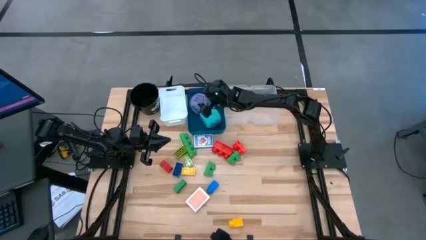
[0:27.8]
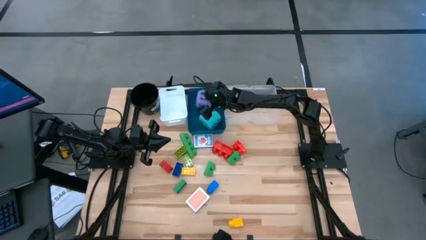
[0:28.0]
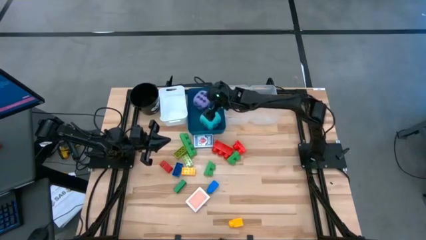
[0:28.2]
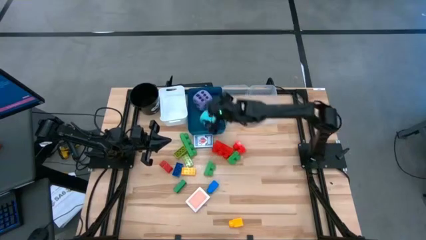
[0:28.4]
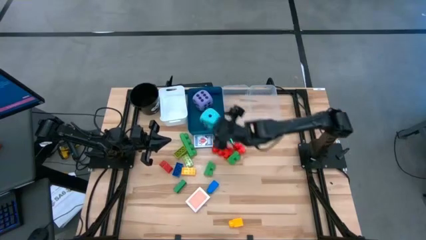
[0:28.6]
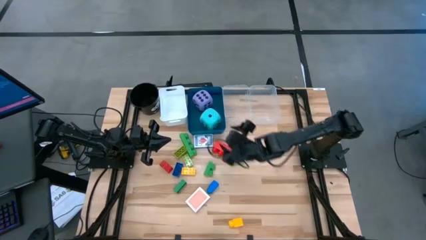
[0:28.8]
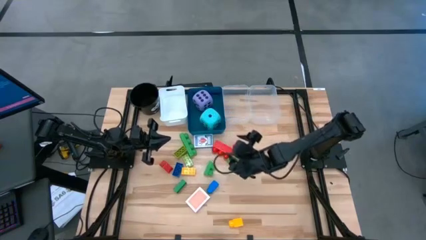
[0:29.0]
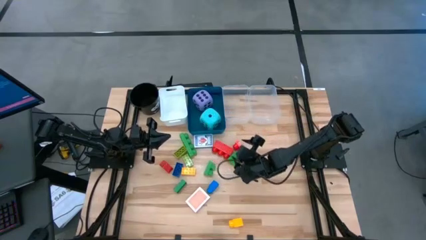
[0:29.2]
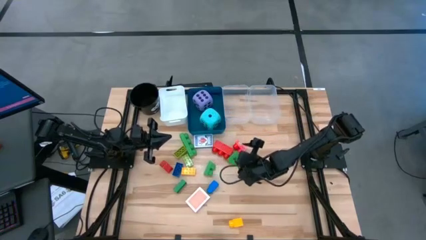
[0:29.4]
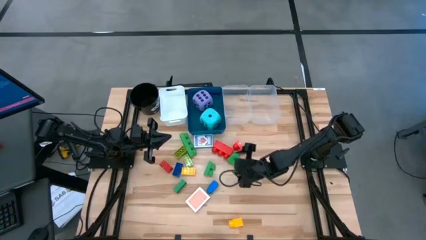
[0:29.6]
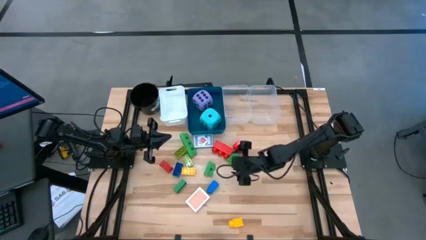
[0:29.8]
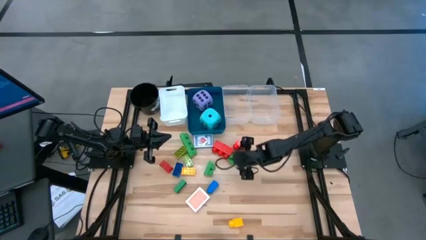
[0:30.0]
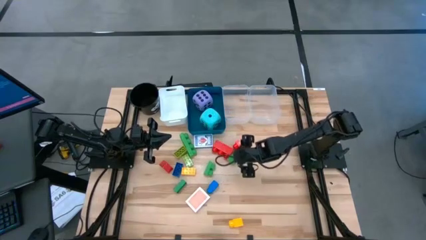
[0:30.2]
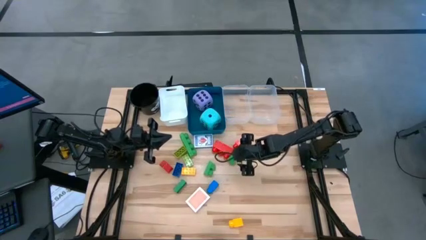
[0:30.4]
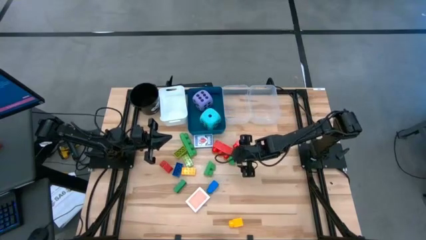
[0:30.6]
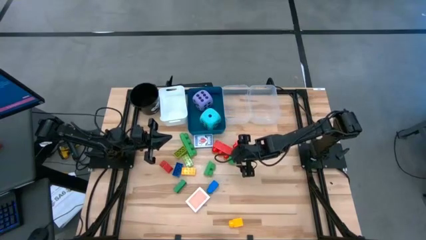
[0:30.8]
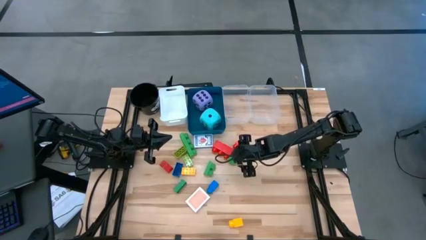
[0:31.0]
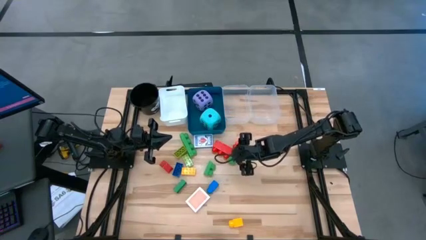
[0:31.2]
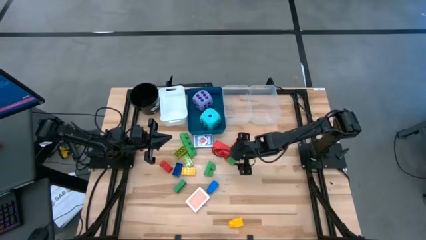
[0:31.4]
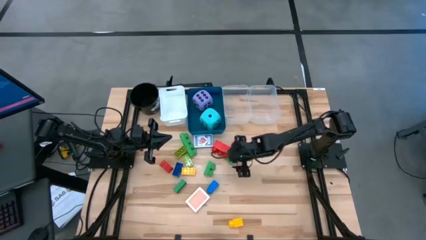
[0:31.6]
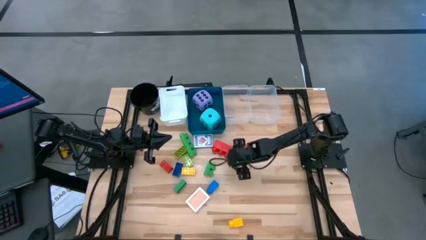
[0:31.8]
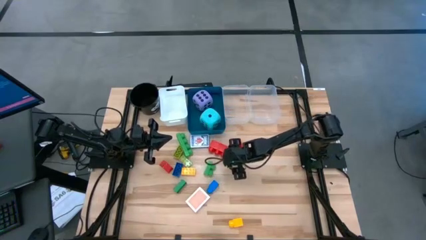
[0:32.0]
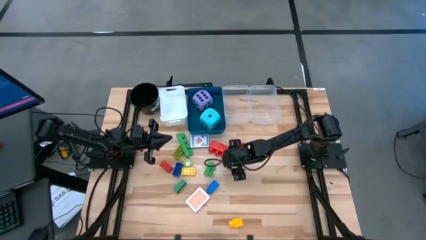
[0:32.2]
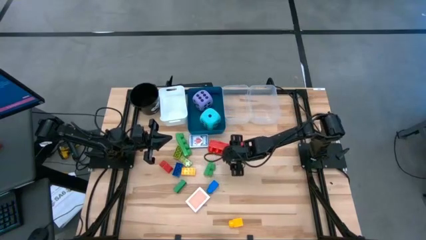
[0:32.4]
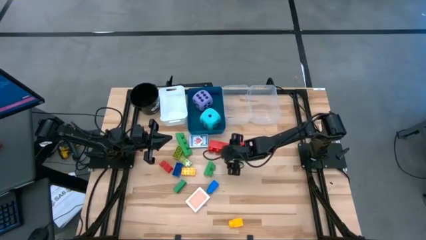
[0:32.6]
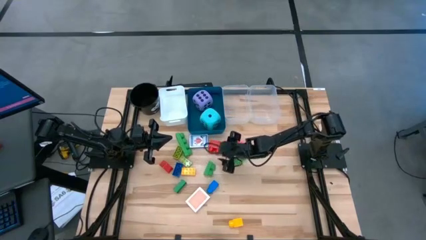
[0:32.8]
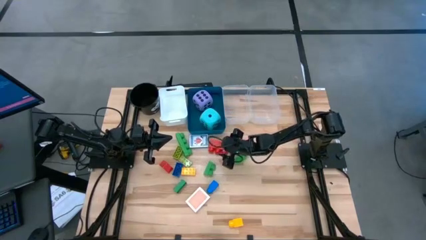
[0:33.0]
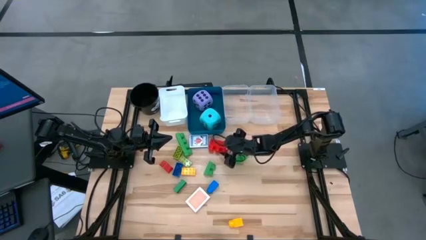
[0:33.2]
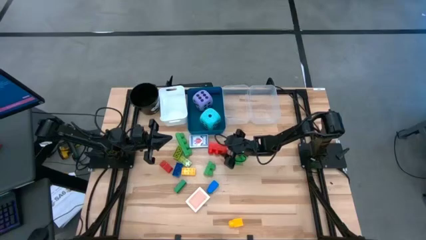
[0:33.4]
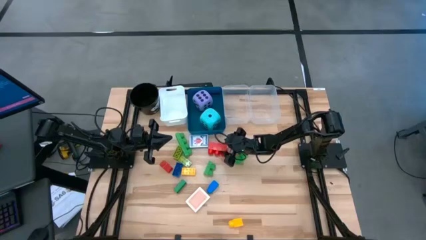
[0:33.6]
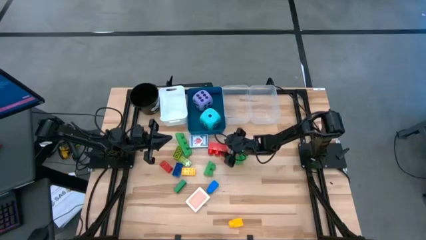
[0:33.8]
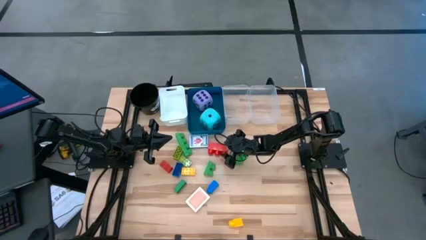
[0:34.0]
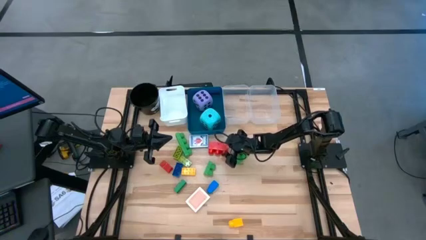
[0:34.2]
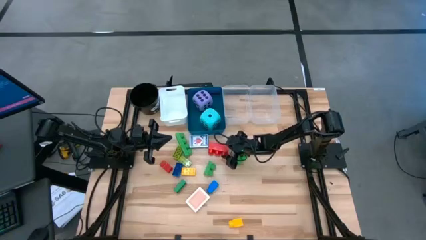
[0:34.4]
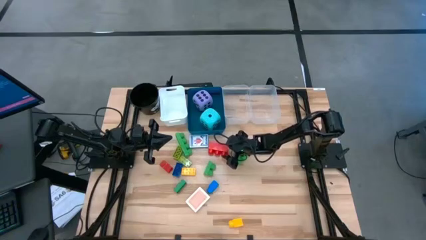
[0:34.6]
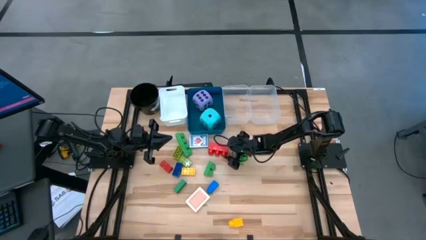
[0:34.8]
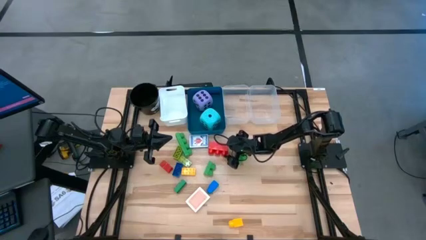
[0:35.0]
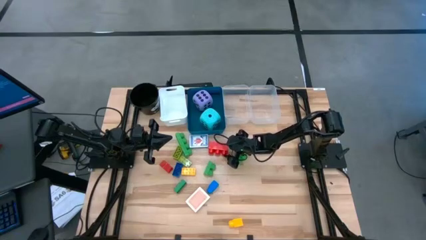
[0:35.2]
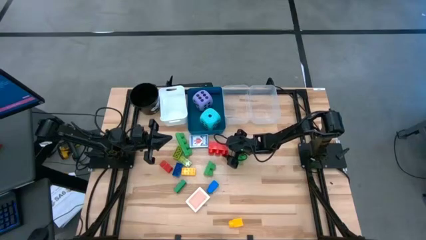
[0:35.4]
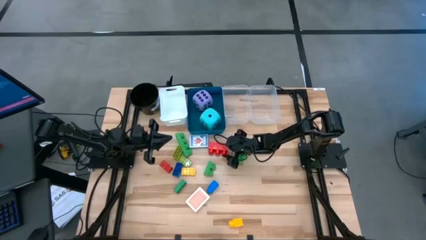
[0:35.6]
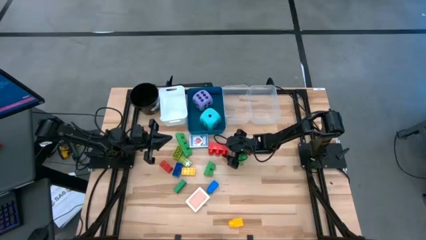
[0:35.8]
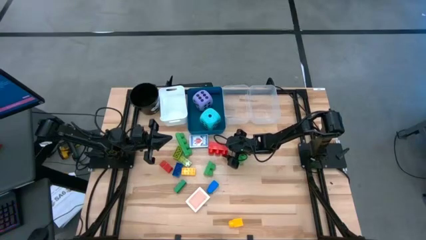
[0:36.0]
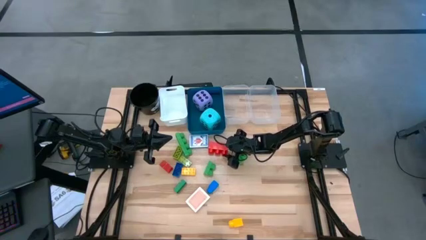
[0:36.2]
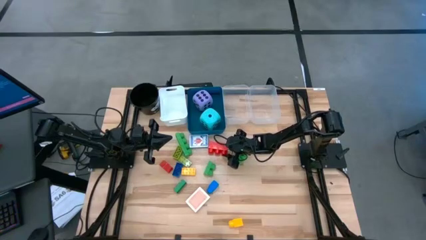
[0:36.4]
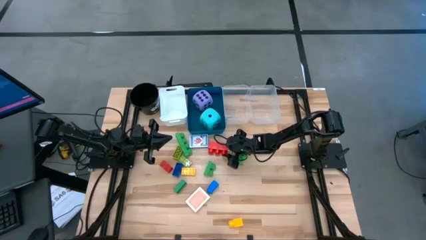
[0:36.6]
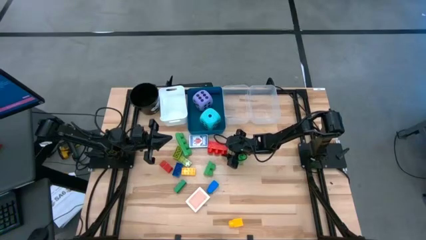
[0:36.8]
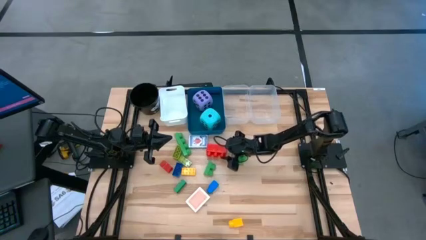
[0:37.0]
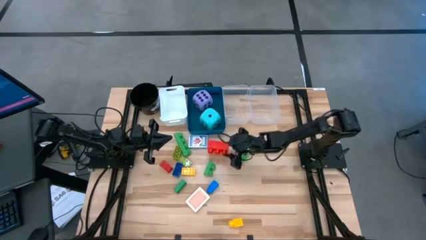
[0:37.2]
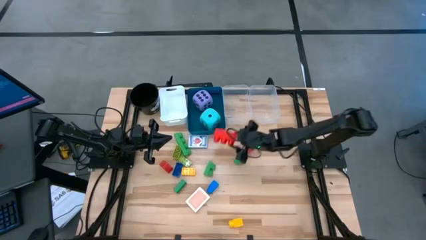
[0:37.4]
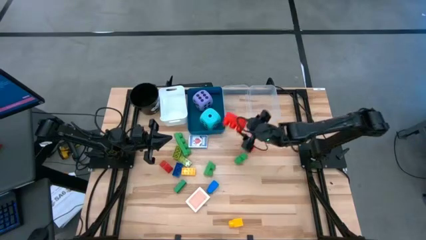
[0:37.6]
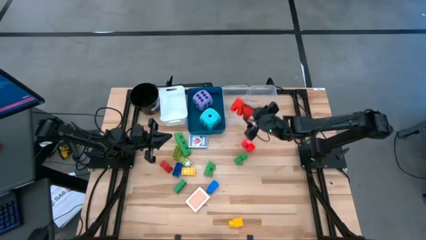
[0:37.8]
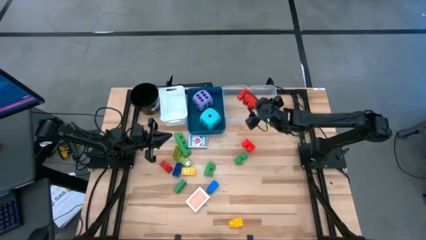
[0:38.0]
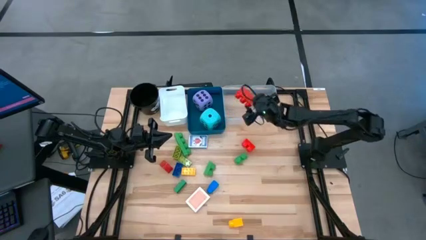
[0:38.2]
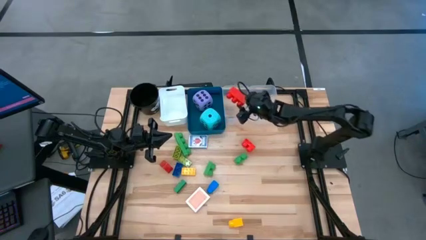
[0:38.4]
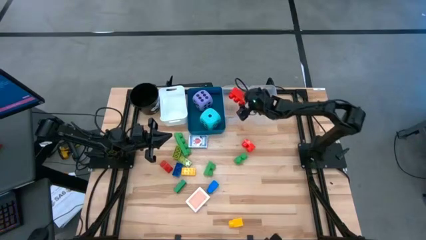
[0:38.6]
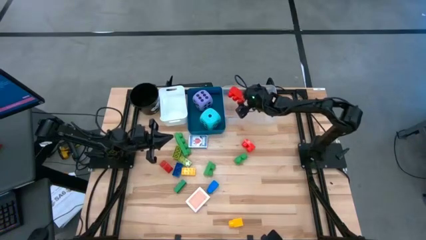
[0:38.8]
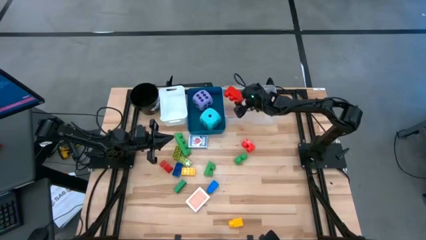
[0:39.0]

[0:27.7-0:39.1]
Task: Pick & Place Toys
Put the red 3 stud game piece into the left transparent bin

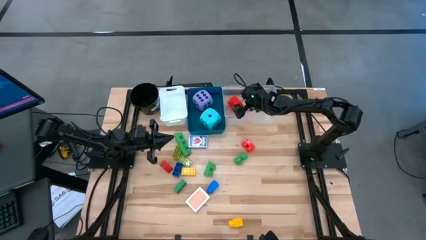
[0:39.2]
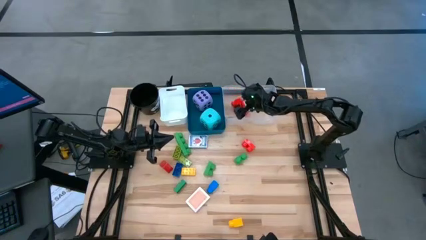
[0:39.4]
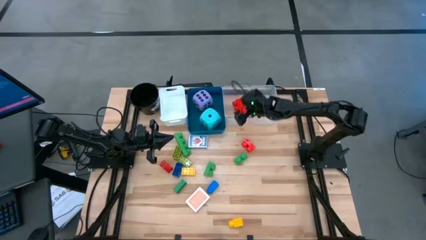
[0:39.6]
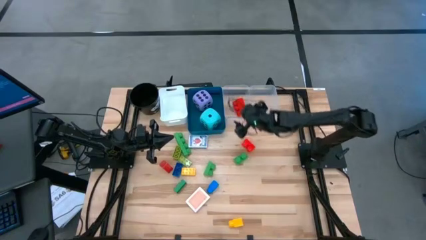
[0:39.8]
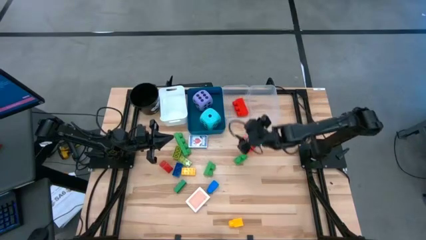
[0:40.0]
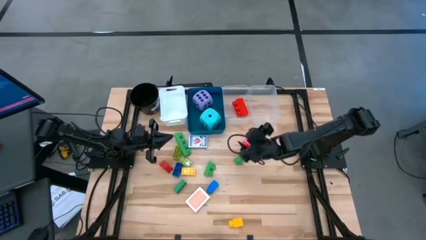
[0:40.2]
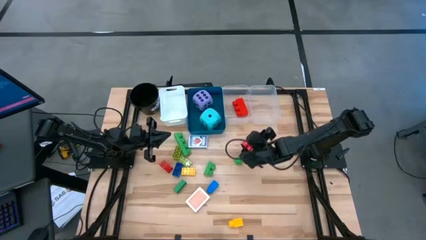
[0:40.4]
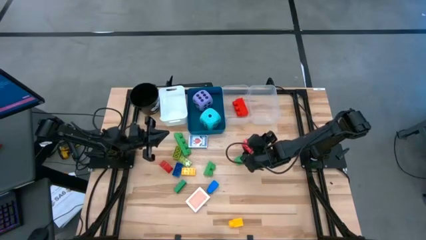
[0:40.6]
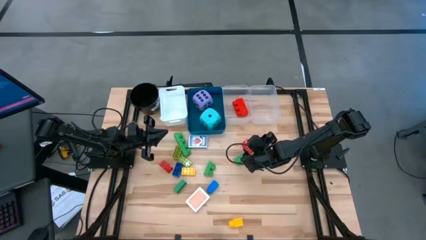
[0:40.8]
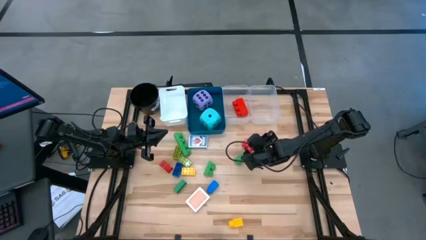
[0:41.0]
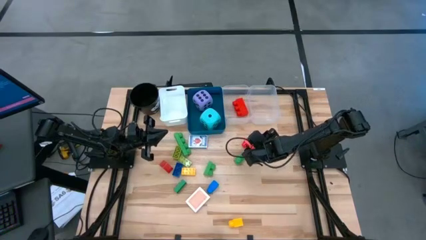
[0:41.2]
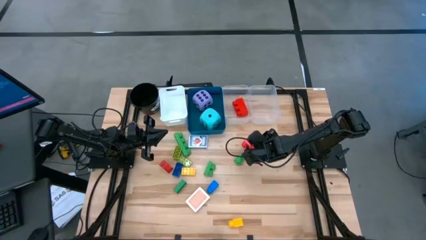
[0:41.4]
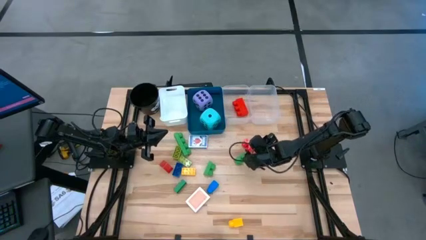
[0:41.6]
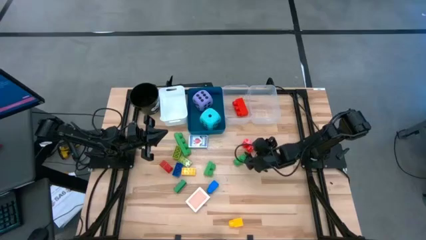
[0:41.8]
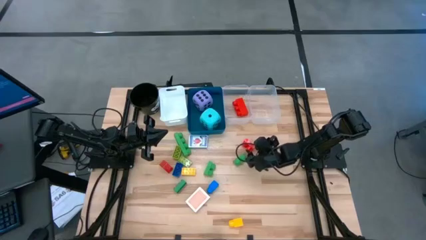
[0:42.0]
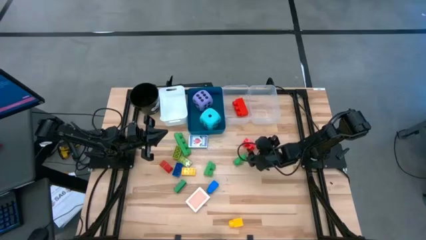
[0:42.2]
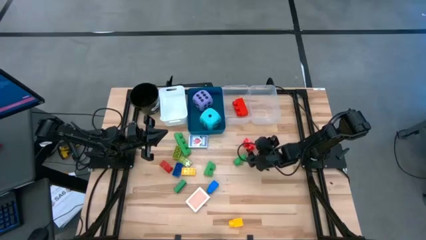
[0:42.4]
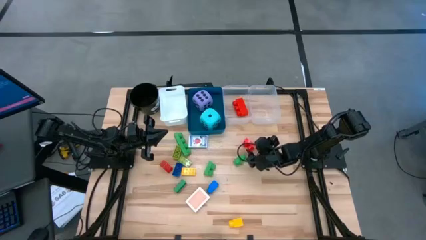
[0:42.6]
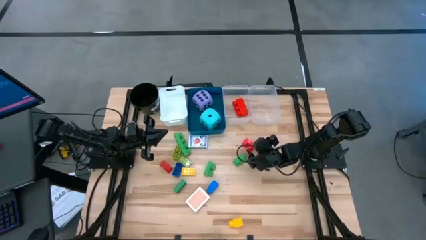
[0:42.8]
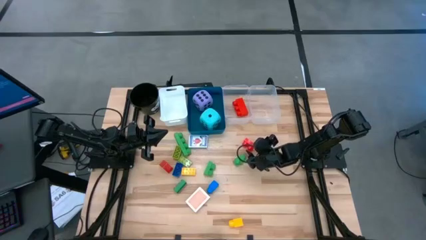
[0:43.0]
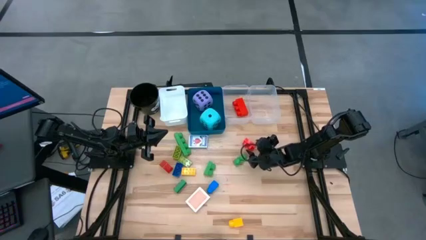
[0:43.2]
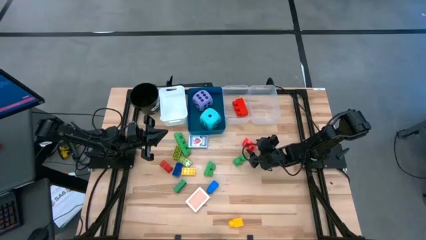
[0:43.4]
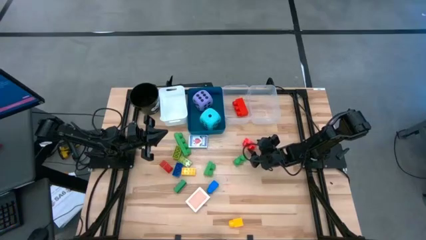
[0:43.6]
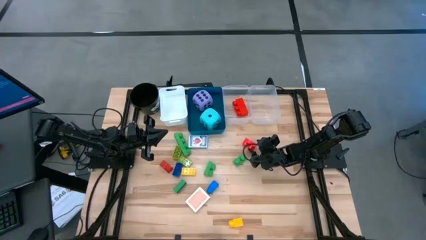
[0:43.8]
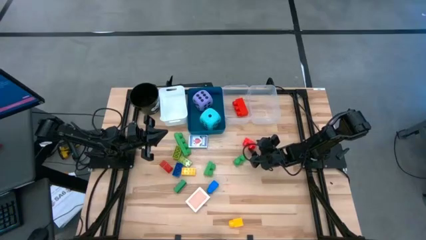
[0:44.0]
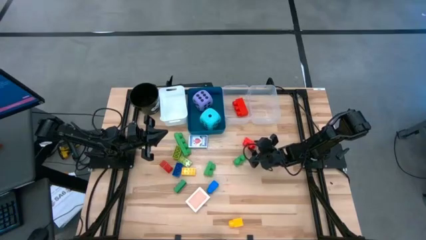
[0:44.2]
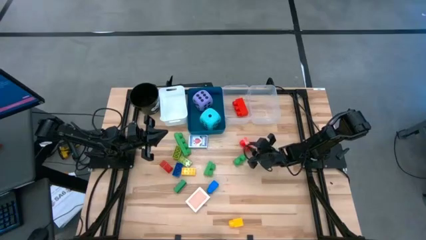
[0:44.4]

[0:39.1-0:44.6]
Put the red 2 stud game piece into the left transparent bin
